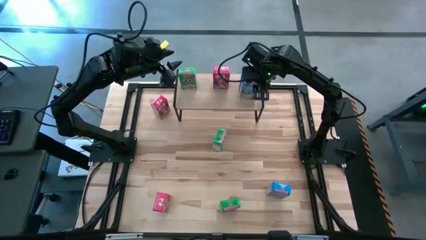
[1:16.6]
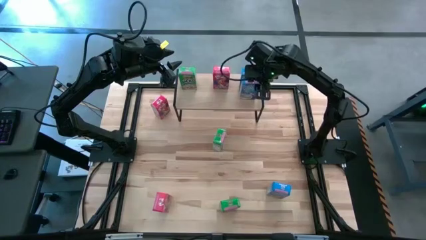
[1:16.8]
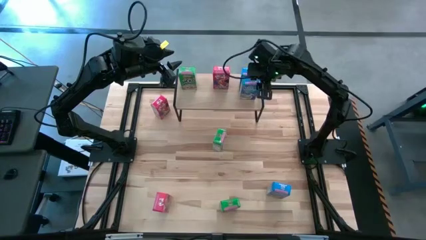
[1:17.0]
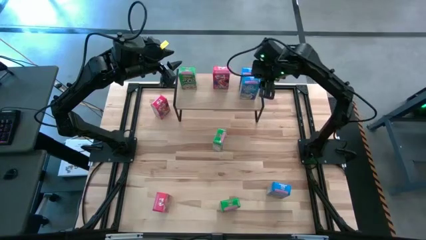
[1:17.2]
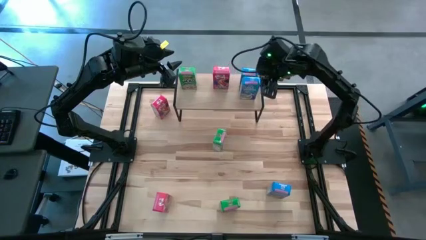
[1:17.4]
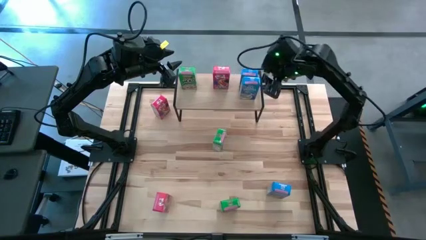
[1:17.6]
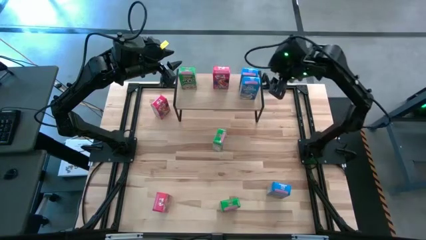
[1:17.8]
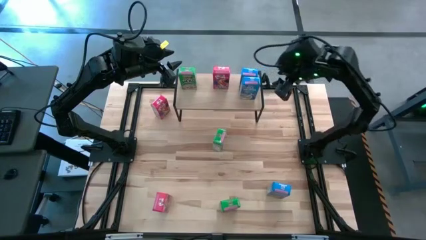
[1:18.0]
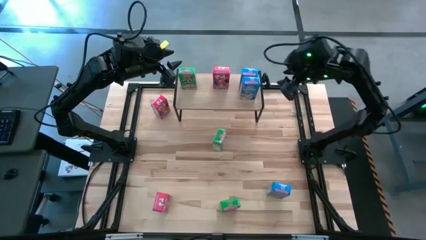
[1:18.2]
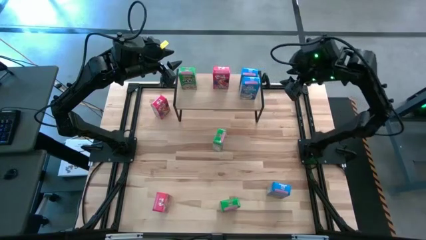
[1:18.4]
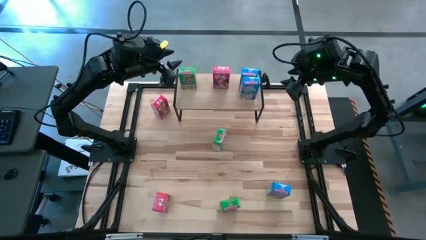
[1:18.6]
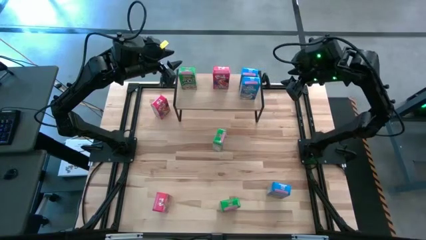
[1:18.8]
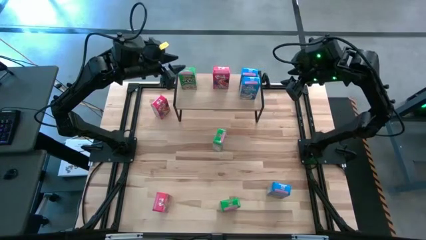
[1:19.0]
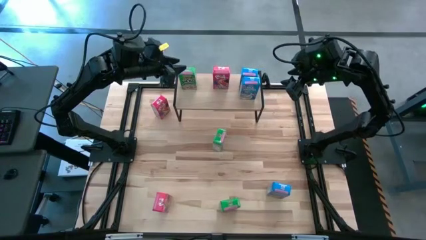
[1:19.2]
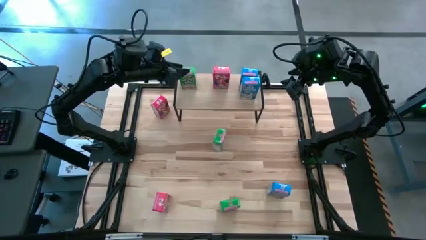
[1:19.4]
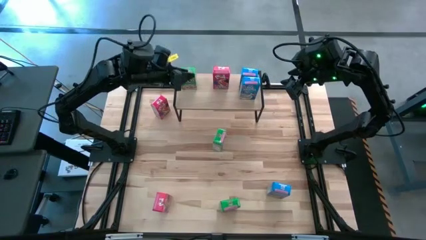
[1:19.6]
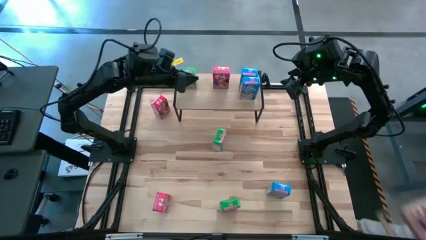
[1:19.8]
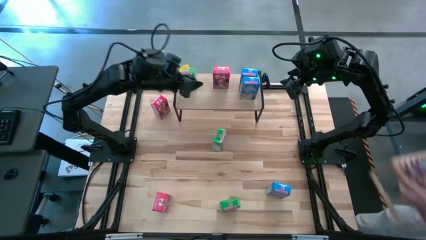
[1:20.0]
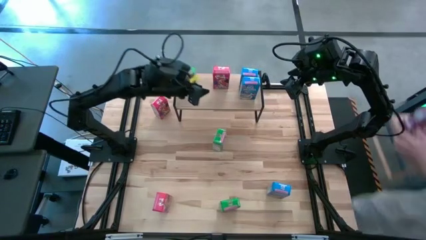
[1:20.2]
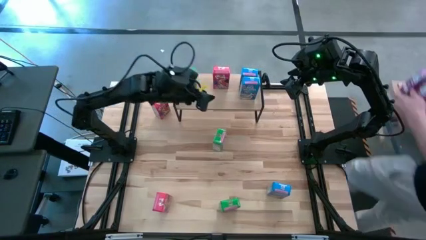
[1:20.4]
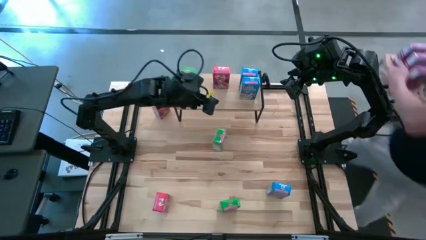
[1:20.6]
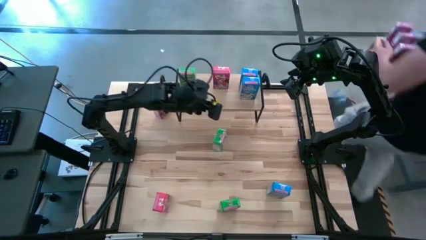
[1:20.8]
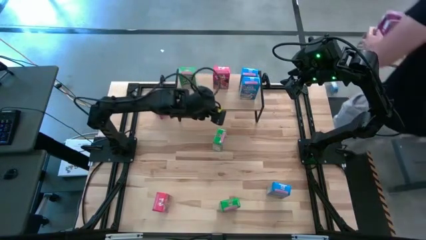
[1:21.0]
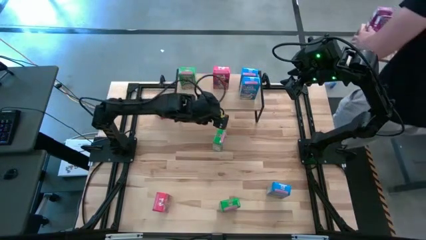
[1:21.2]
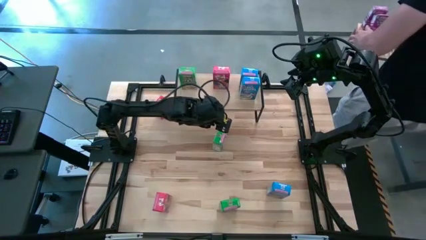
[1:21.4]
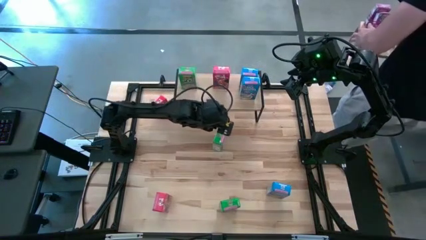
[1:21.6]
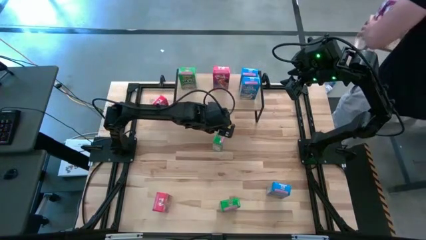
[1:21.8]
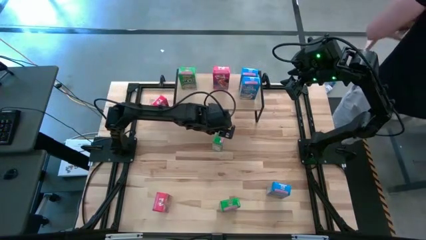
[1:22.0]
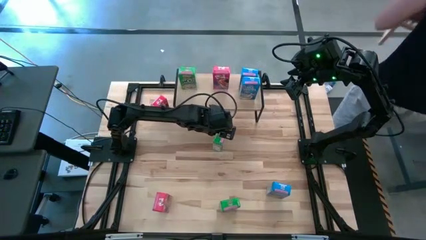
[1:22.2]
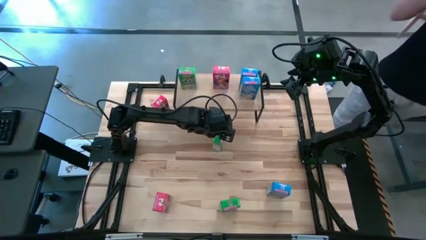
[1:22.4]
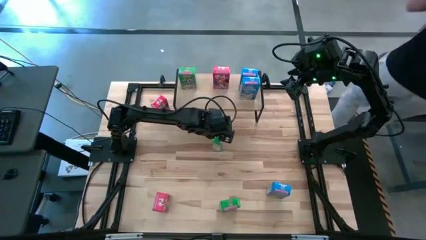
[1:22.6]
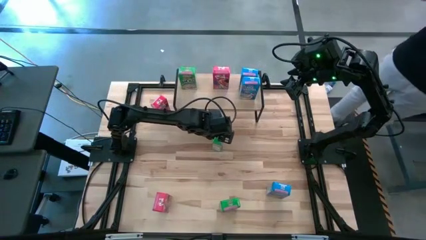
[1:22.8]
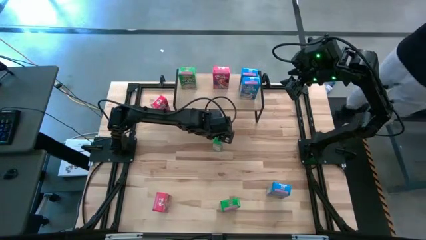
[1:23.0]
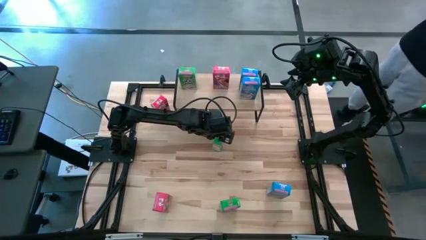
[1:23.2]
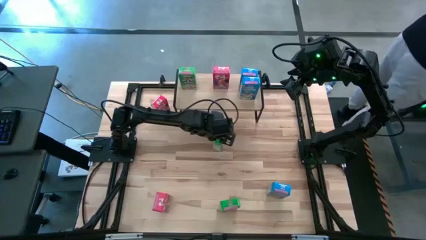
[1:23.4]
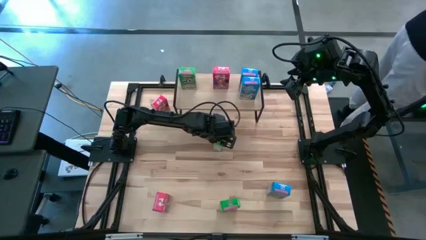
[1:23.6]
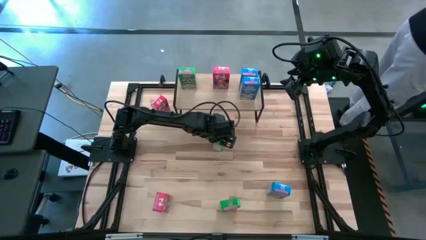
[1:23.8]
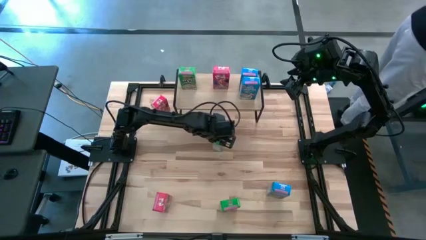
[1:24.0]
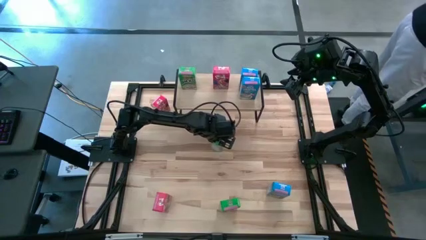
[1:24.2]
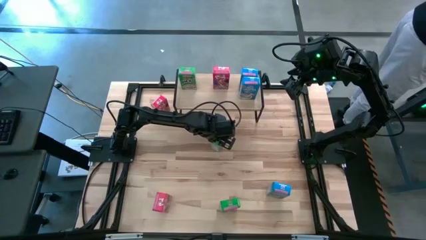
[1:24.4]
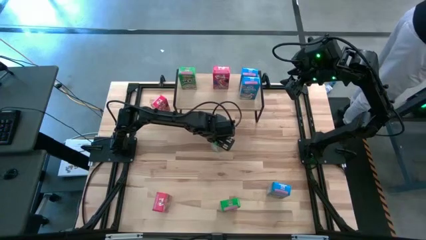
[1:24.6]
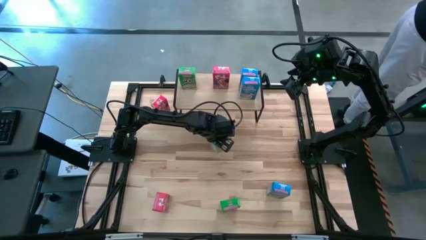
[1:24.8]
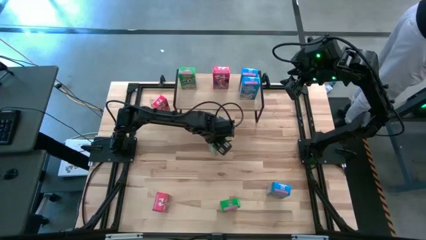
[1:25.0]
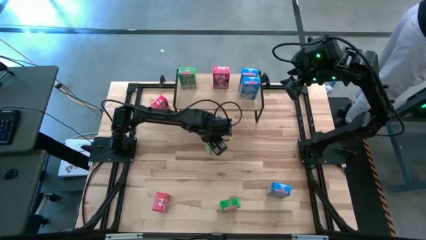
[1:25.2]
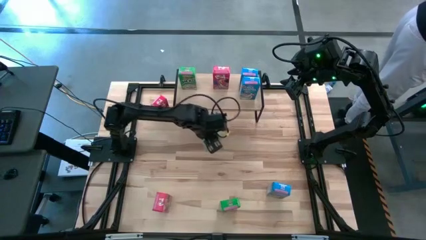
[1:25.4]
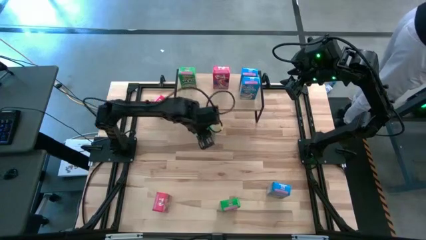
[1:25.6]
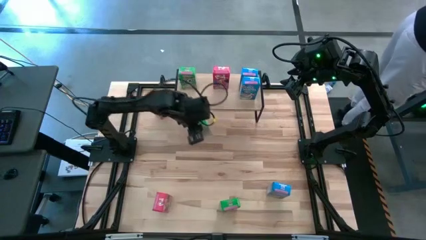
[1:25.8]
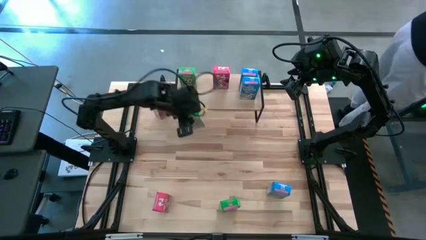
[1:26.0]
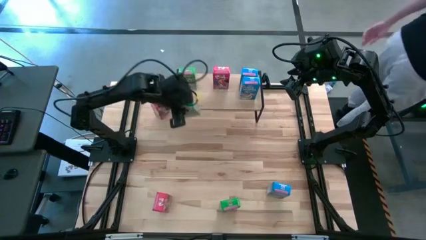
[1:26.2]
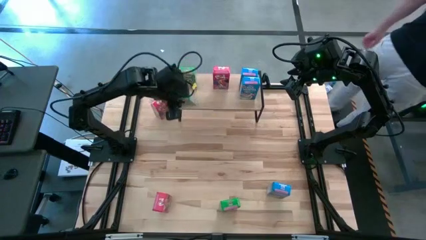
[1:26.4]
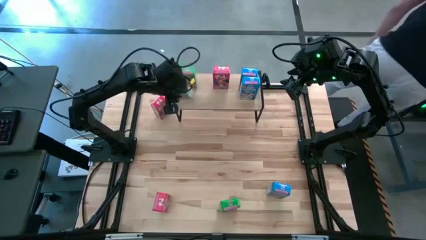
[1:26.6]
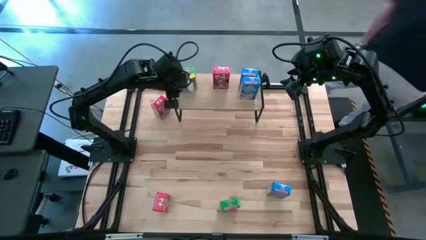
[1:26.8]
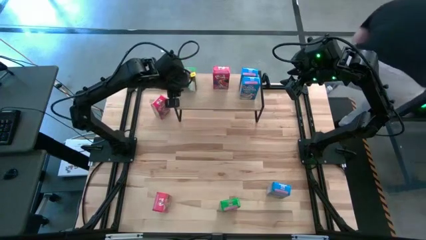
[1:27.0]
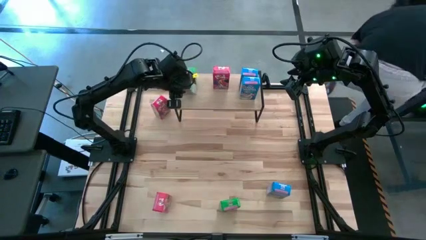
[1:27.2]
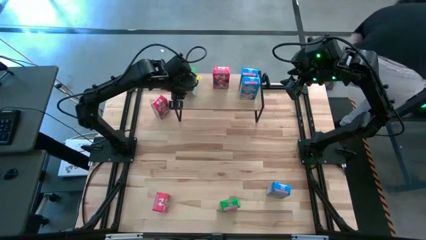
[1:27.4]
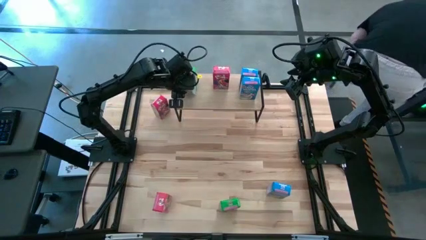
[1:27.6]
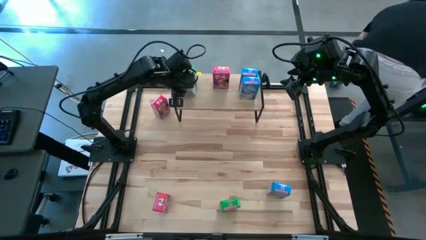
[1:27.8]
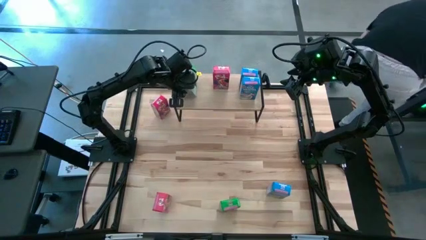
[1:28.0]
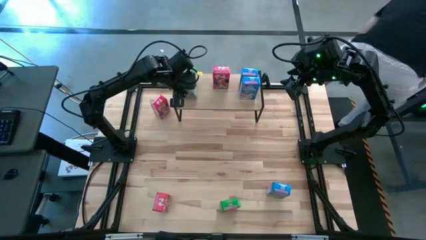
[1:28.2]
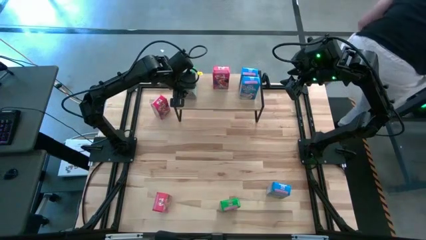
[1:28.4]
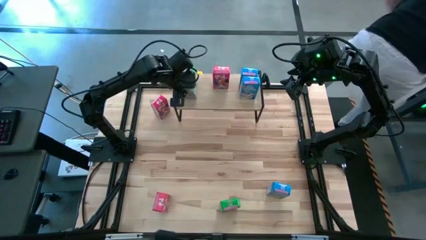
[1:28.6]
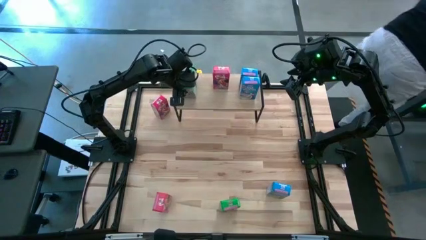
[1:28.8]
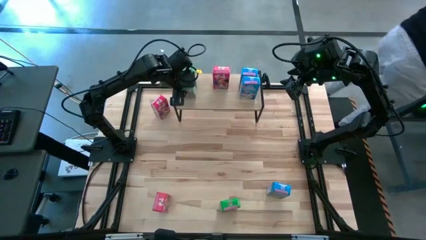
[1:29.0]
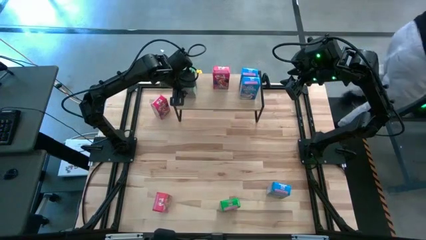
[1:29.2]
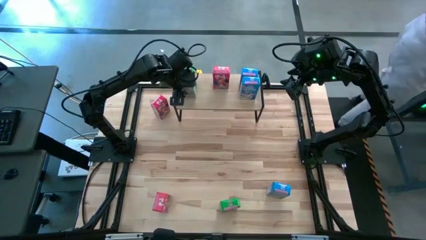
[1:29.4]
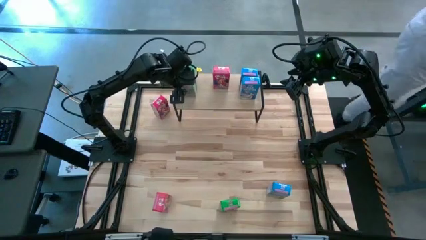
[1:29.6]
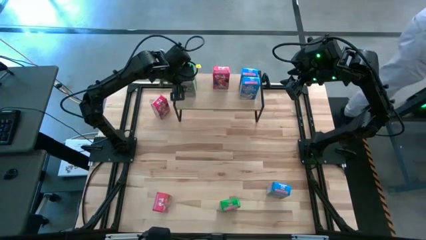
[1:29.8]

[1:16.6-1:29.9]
Task: Stack cereal on shelf
Put the top green cereal box on the shelf aligned with the other green cereal box
